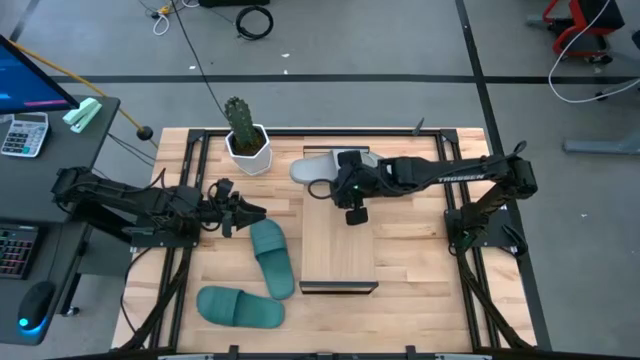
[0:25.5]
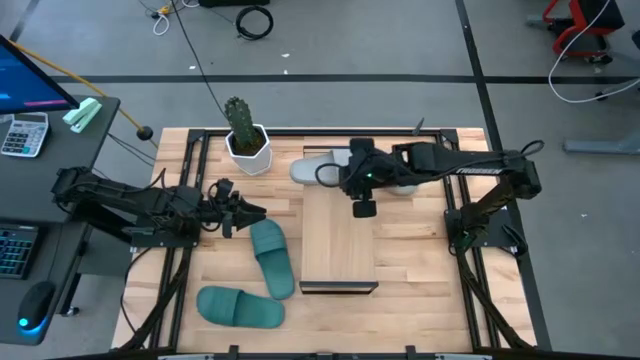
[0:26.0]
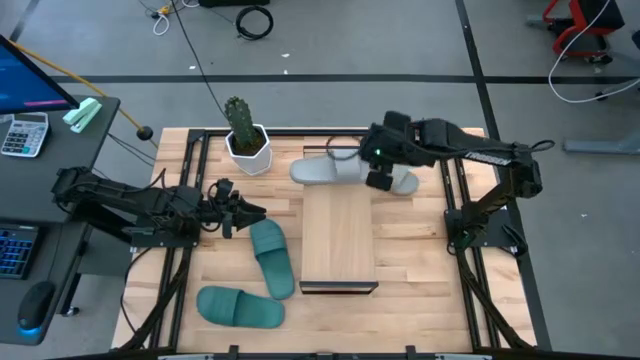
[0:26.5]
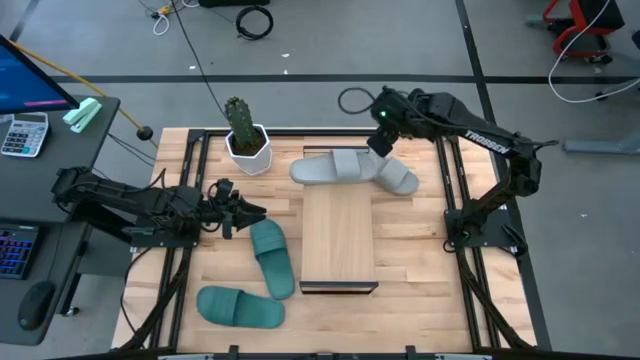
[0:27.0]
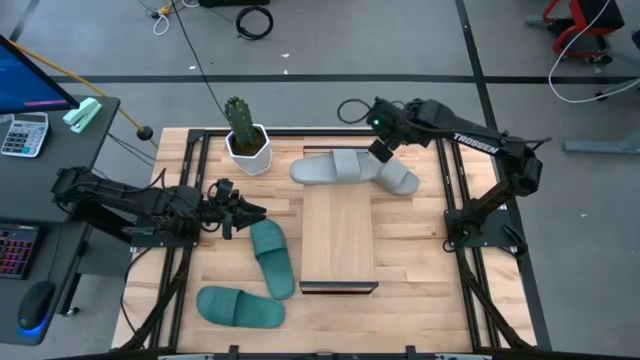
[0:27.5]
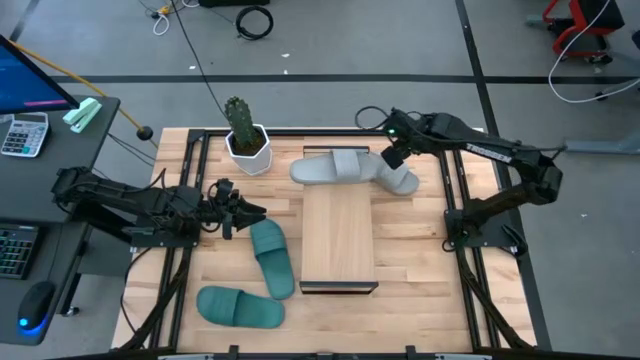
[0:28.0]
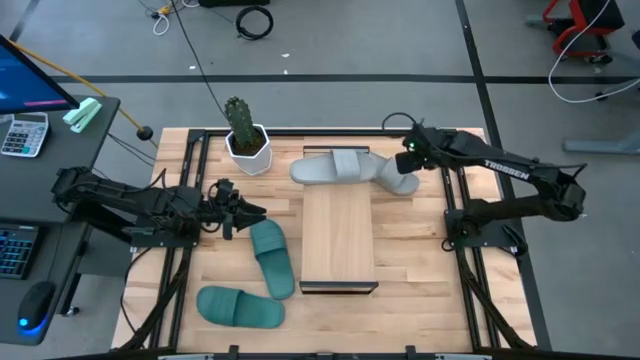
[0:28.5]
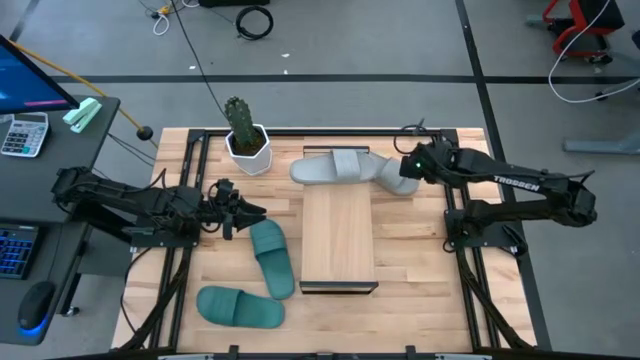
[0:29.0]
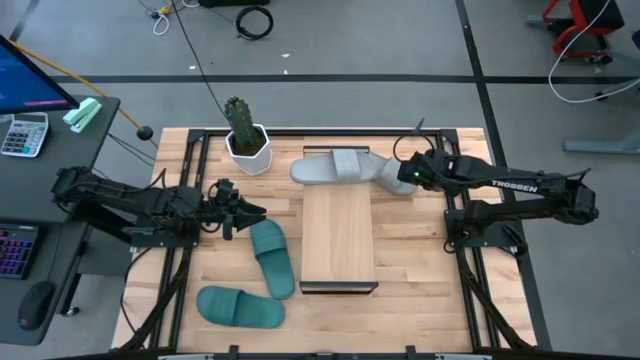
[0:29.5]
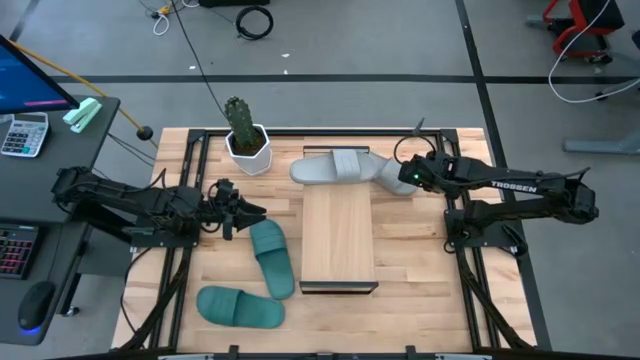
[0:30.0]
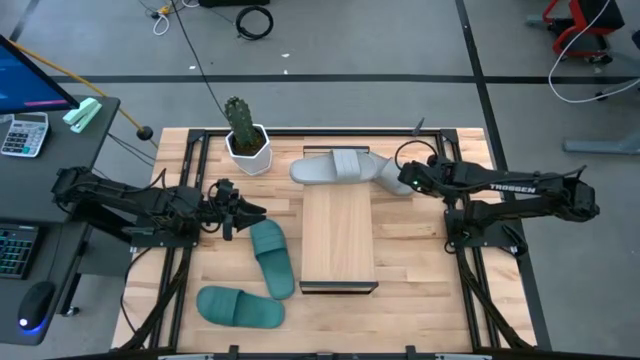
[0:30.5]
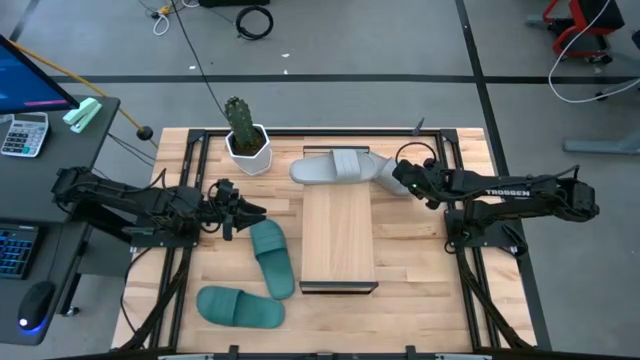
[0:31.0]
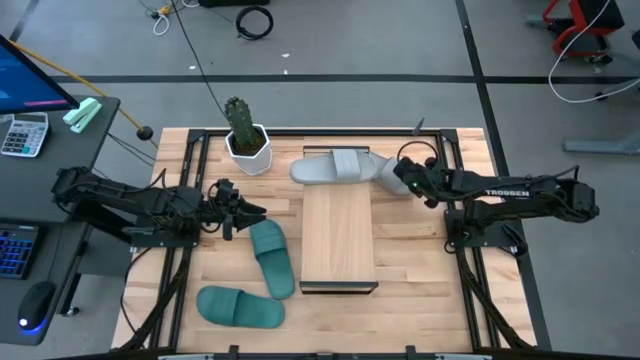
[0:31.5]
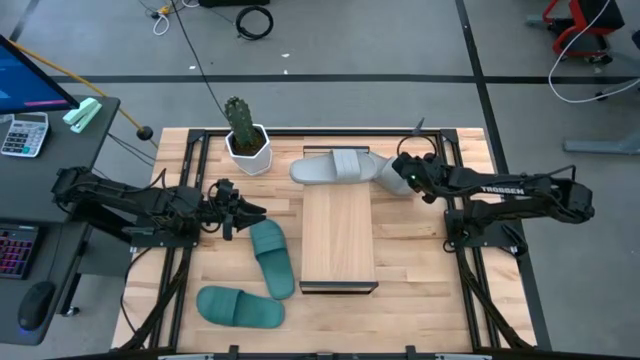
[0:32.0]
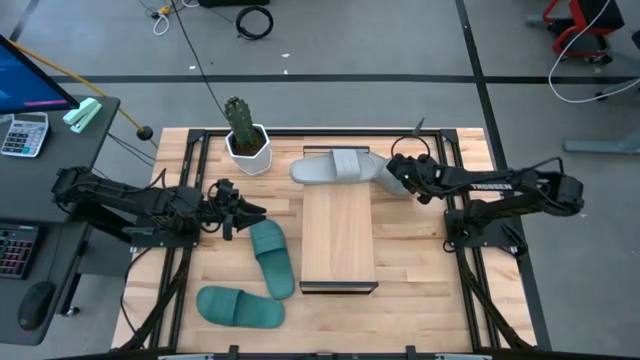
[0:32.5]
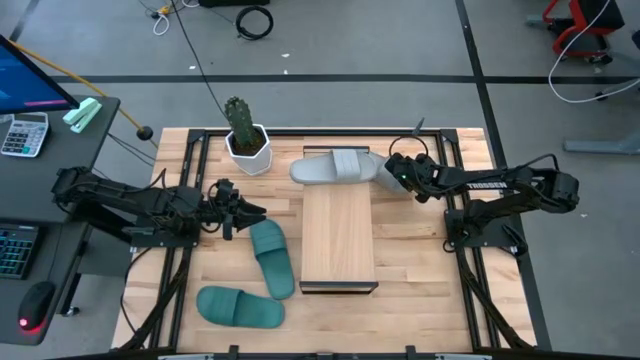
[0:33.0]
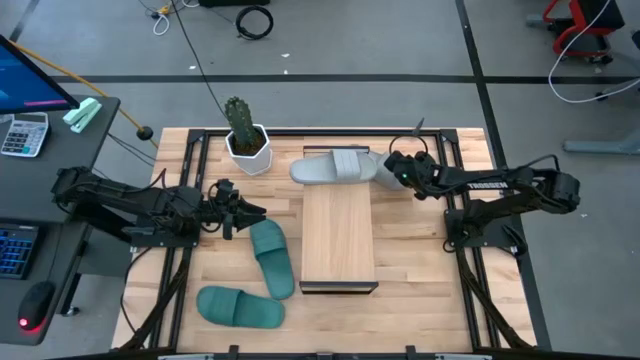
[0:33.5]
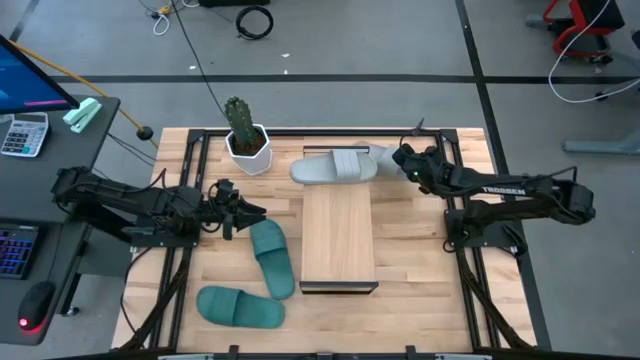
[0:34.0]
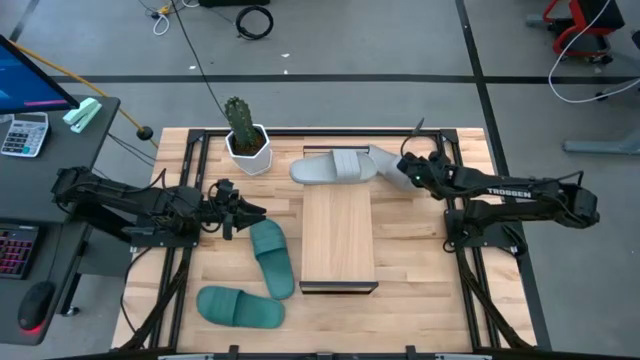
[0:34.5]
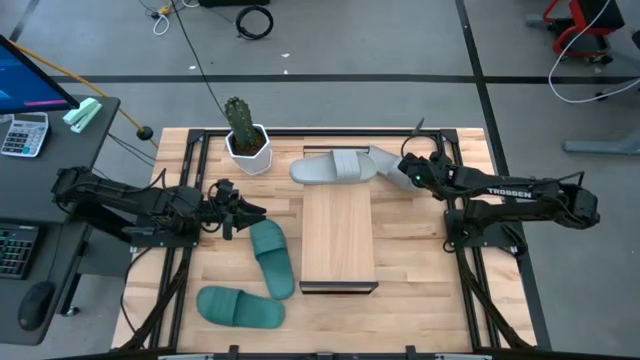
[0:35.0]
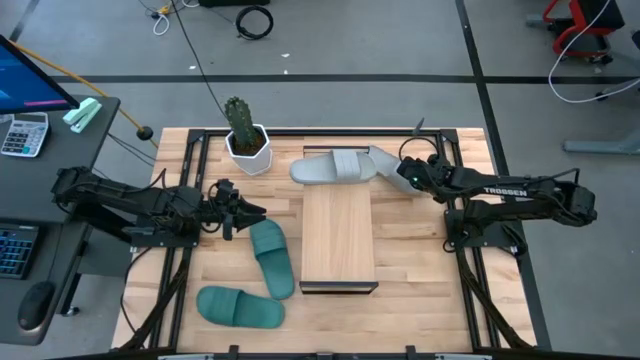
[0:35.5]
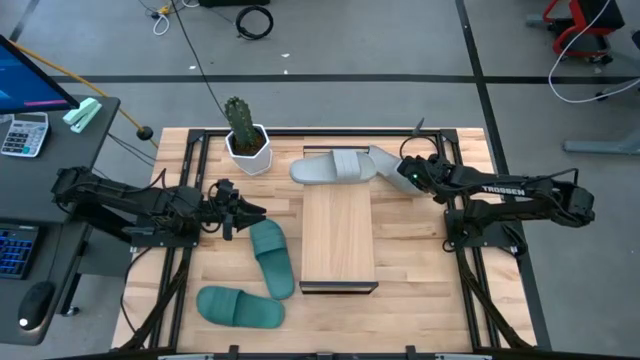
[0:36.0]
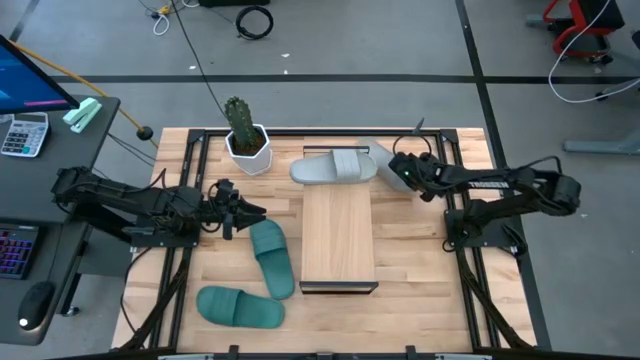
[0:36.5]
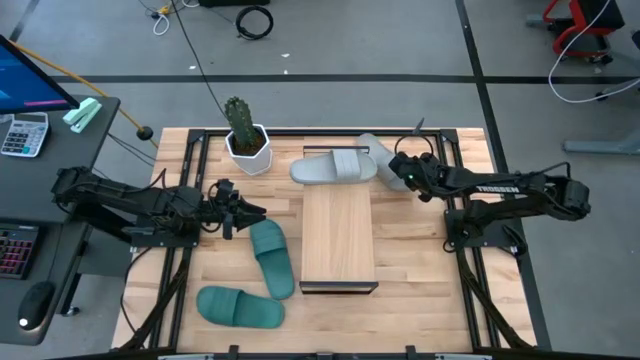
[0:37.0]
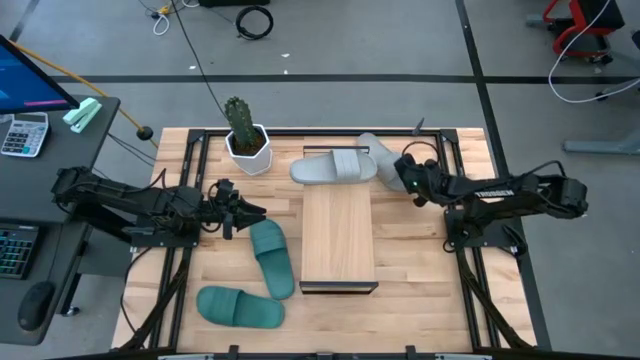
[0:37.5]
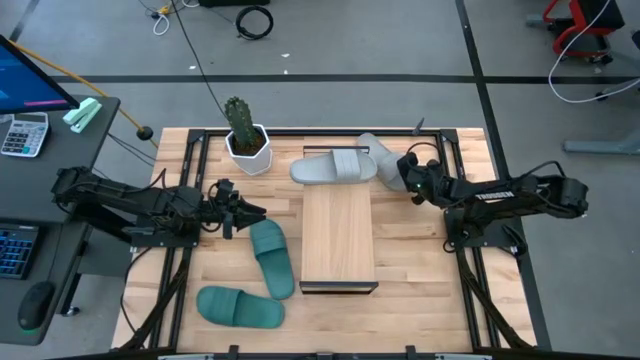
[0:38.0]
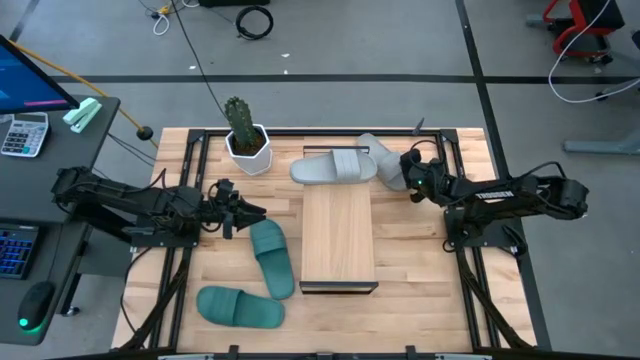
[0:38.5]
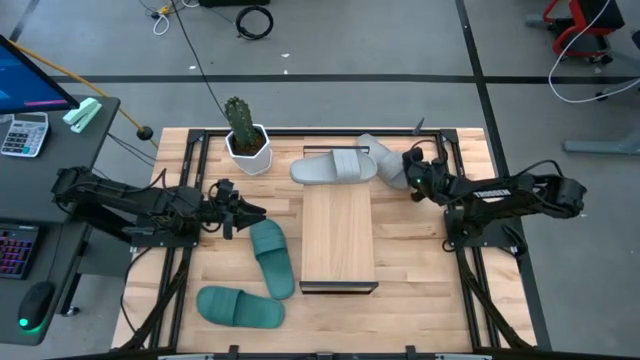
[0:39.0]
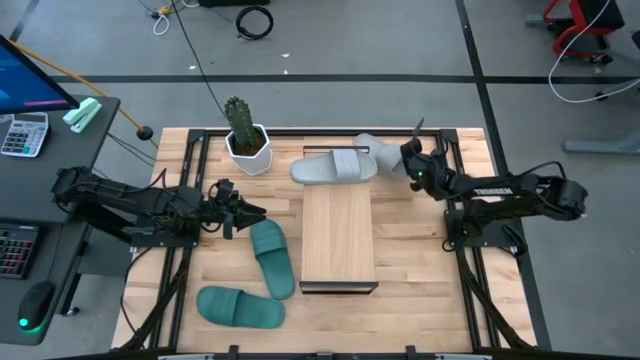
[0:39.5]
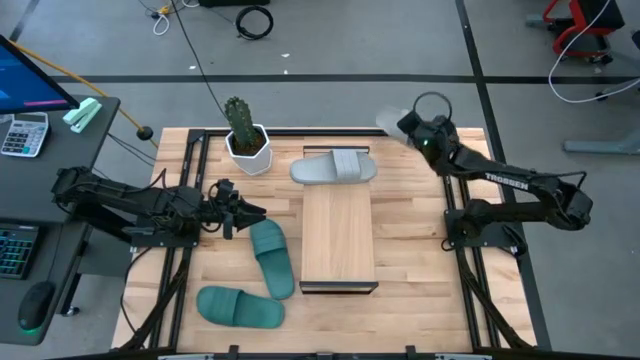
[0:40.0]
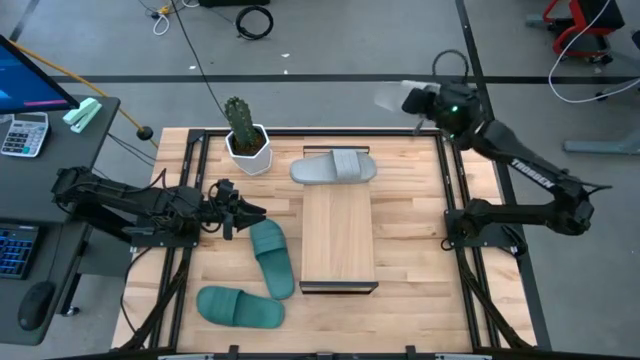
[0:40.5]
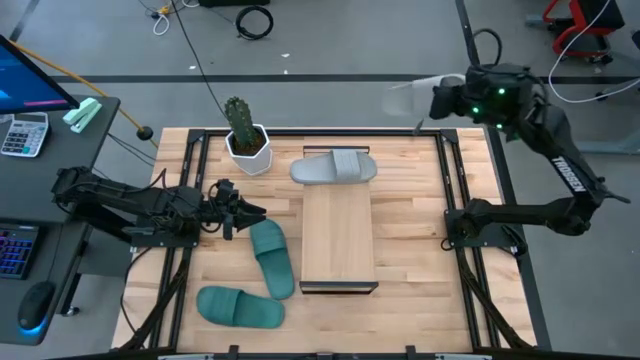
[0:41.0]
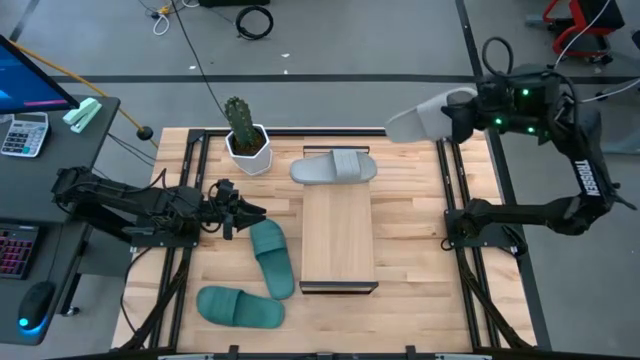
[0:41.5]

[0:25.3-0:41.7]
Task: Pick and place slides into the shelf
Put the gray slide on the shelf

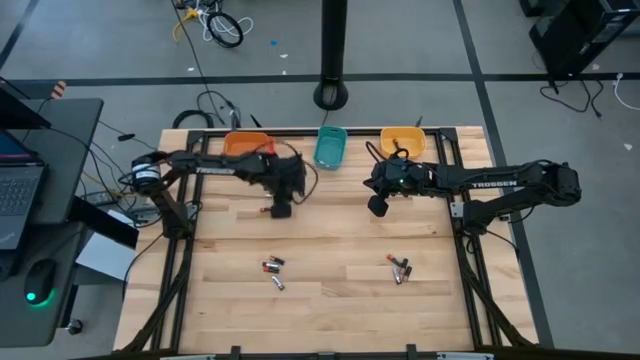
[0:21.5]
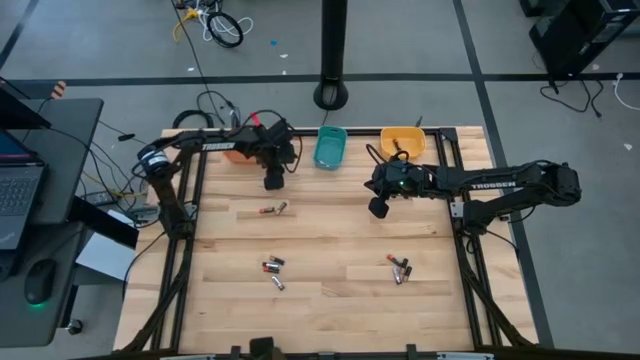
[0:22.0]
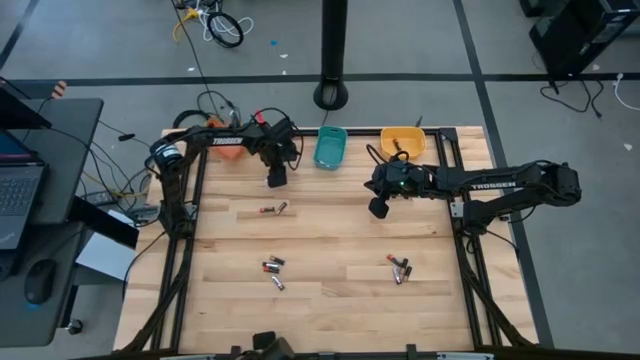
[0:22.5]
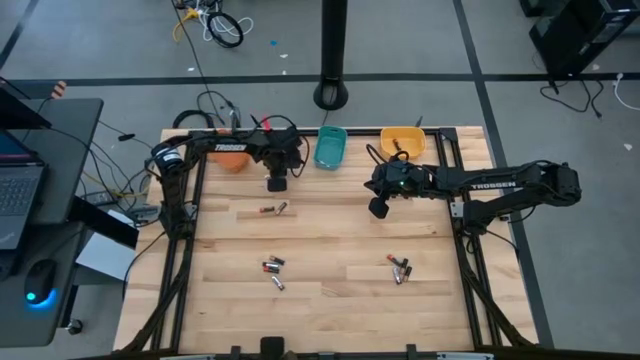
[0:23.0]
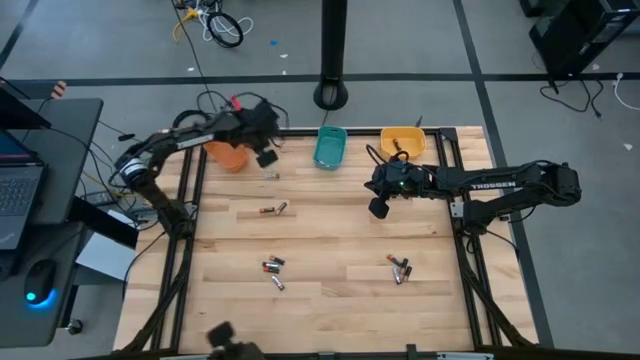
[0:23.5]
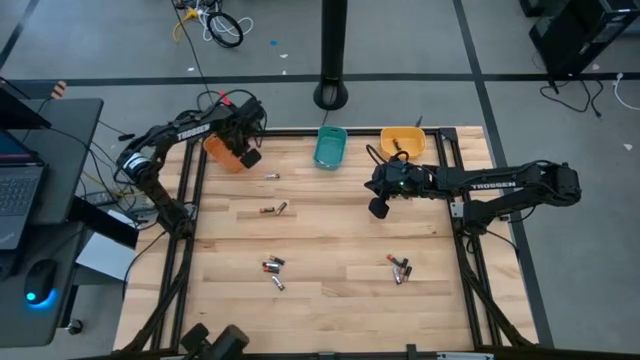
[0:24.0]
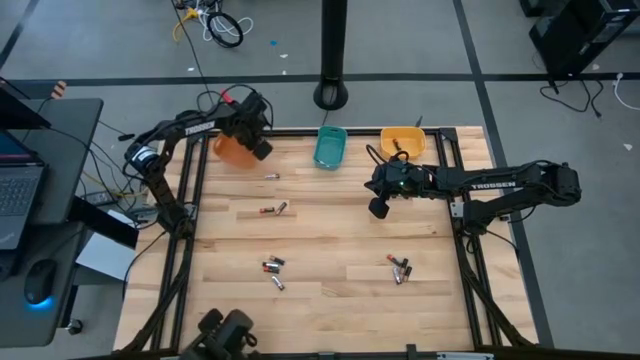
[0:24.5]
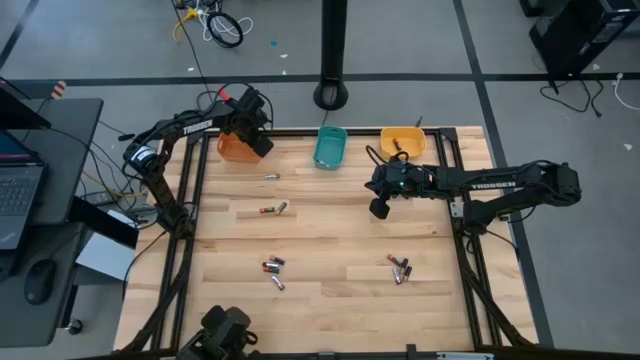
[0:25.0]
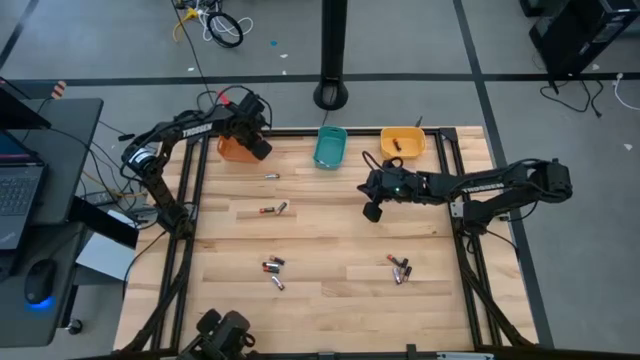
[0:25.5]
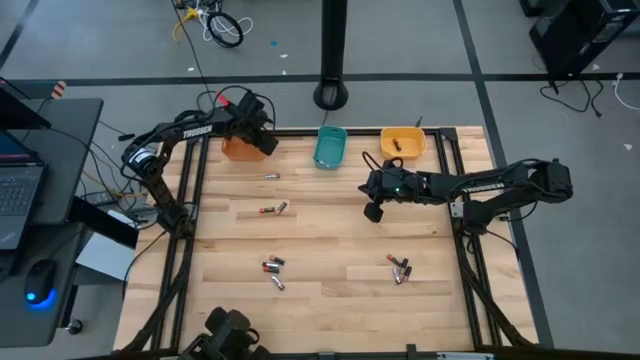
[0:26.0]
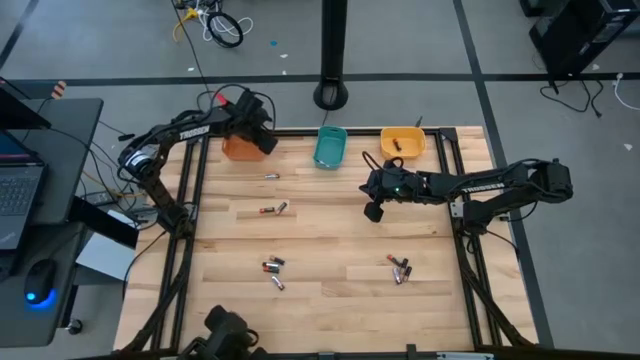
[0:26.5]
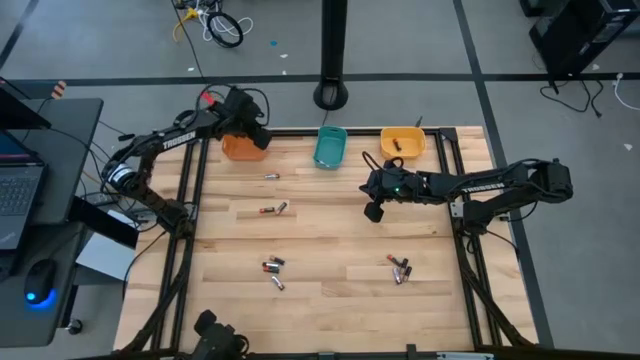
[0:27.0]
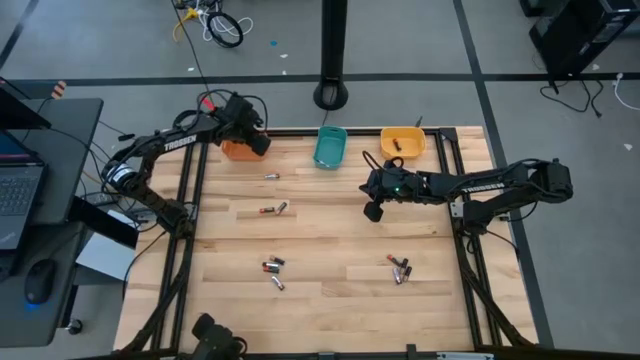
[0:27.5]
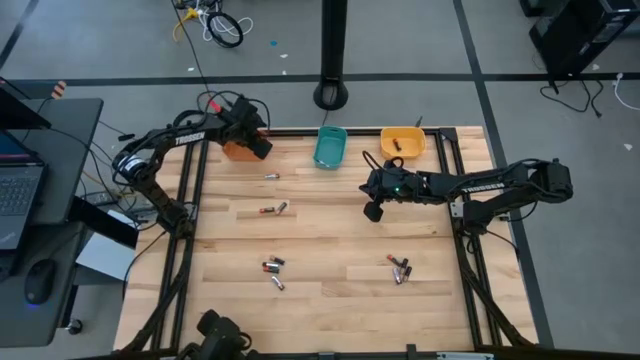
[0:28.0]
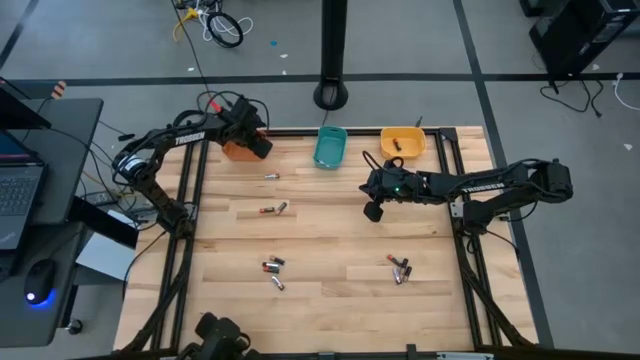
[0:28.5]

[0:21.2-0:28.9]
Task: Sort batteries
Put the brown-black battery in the orange bin
